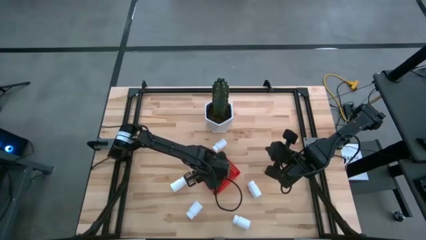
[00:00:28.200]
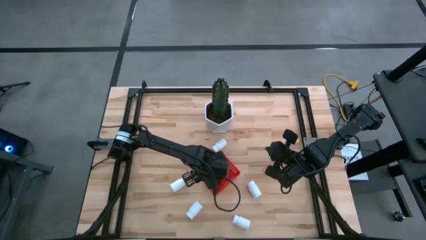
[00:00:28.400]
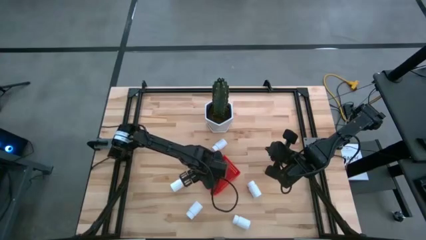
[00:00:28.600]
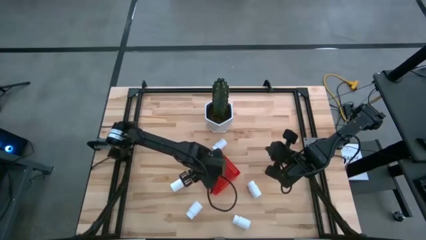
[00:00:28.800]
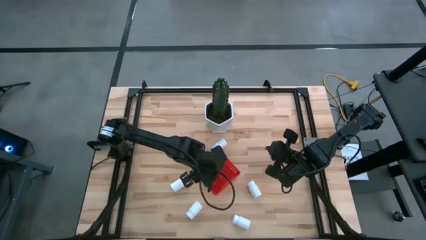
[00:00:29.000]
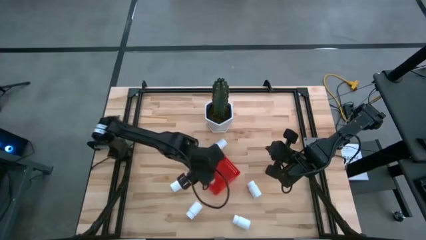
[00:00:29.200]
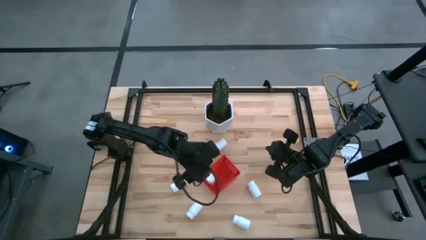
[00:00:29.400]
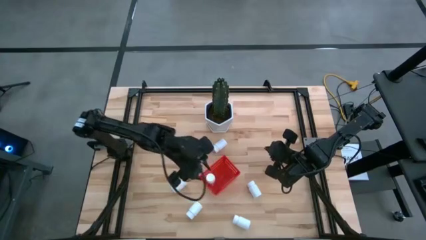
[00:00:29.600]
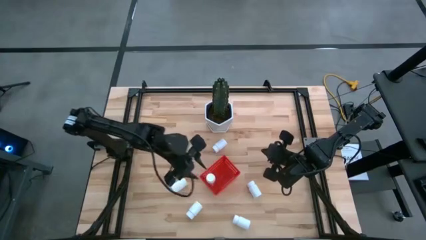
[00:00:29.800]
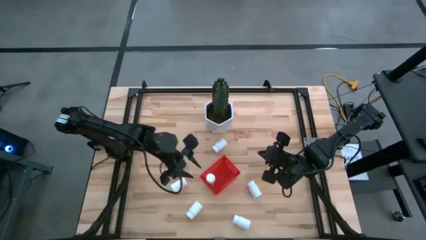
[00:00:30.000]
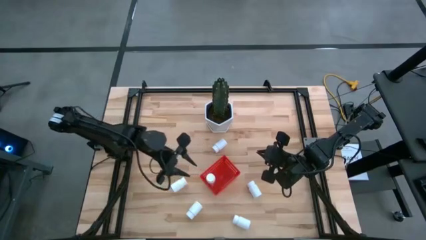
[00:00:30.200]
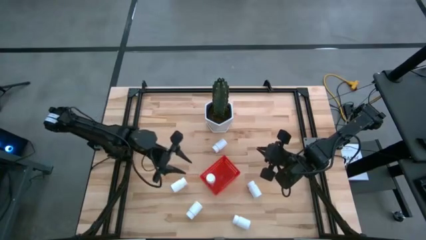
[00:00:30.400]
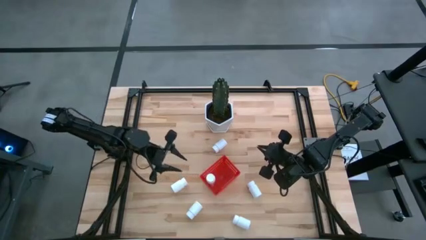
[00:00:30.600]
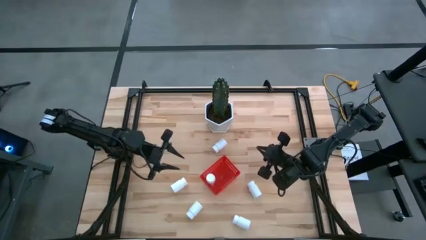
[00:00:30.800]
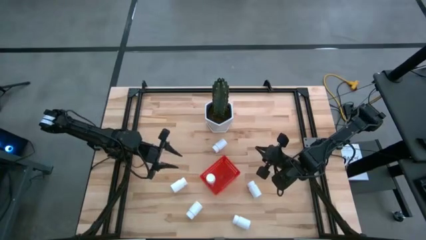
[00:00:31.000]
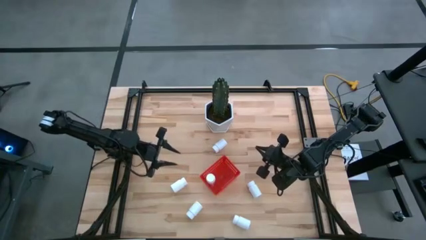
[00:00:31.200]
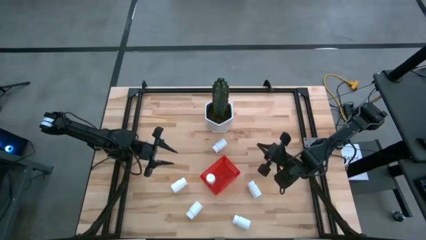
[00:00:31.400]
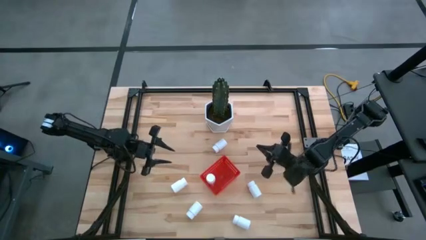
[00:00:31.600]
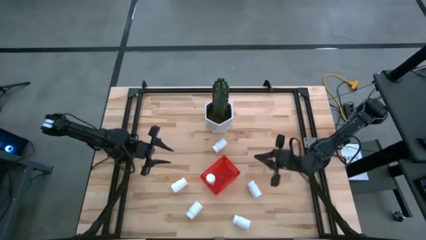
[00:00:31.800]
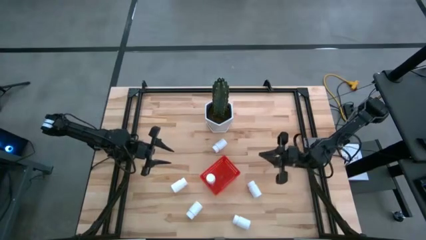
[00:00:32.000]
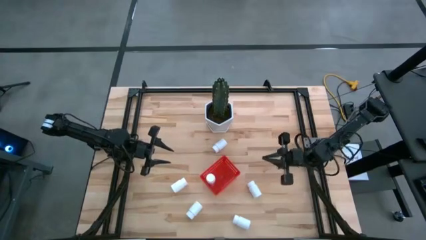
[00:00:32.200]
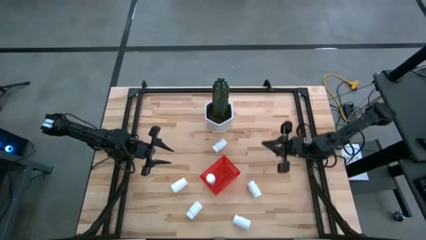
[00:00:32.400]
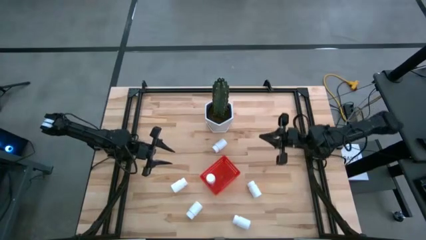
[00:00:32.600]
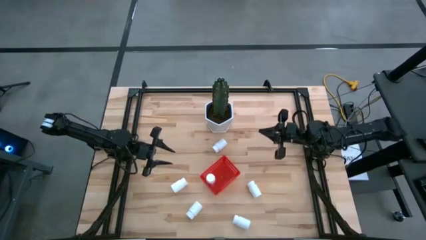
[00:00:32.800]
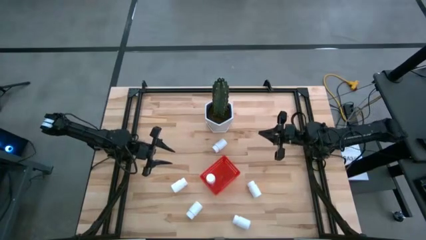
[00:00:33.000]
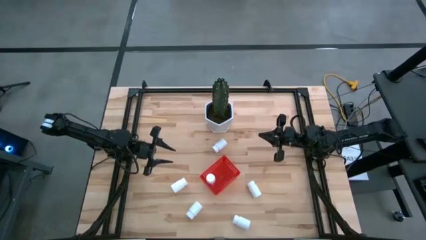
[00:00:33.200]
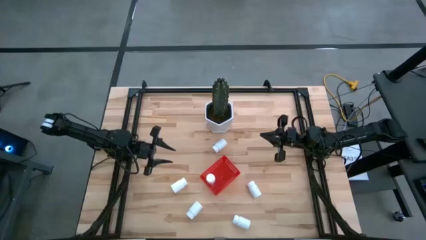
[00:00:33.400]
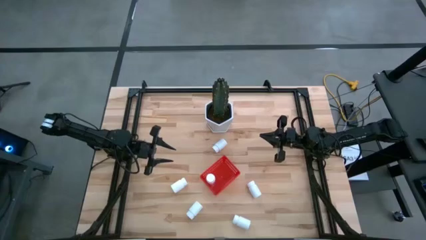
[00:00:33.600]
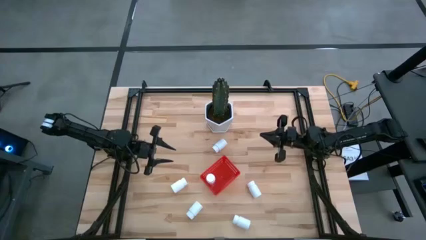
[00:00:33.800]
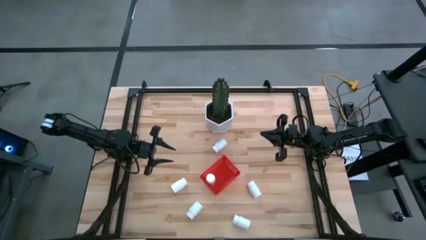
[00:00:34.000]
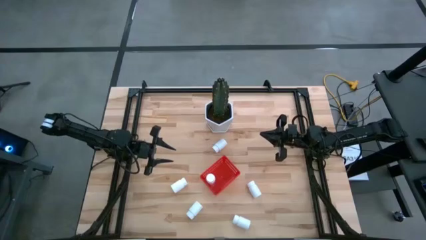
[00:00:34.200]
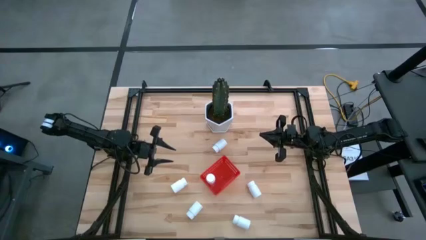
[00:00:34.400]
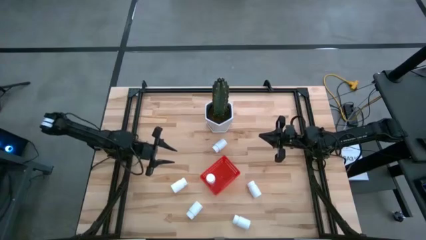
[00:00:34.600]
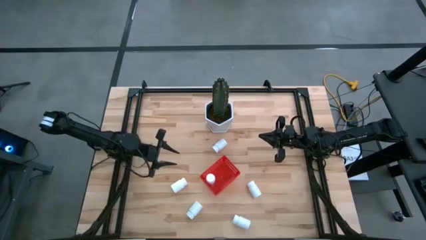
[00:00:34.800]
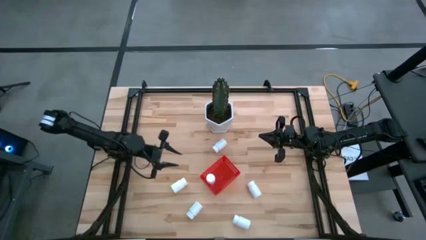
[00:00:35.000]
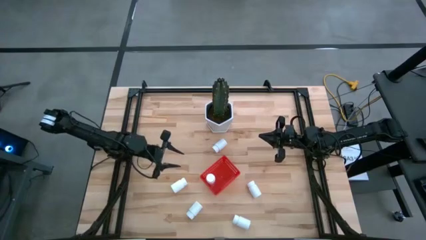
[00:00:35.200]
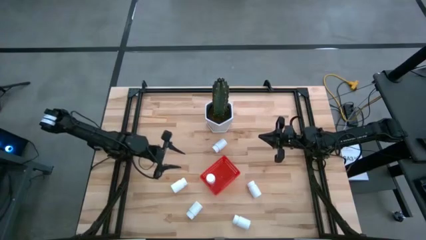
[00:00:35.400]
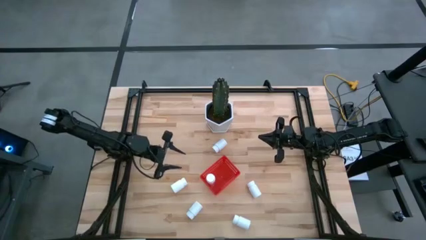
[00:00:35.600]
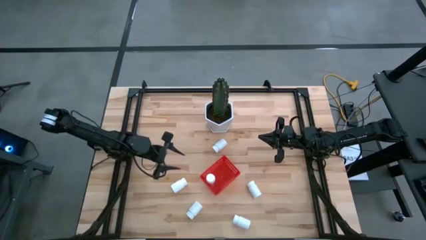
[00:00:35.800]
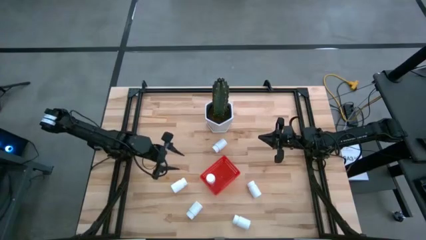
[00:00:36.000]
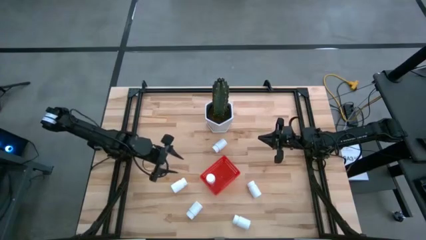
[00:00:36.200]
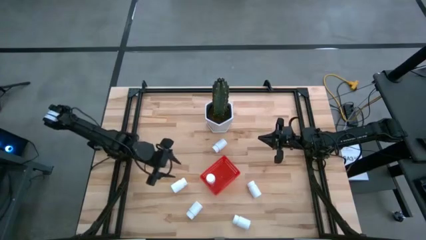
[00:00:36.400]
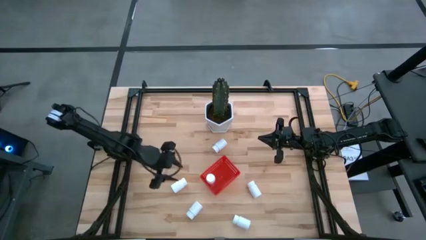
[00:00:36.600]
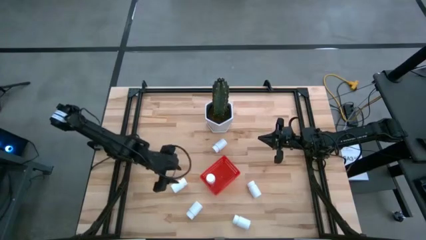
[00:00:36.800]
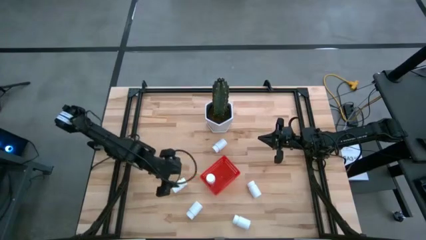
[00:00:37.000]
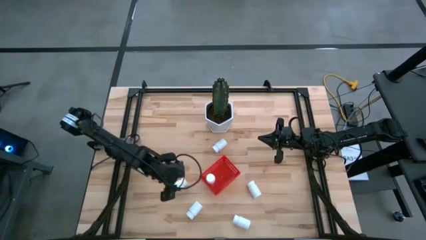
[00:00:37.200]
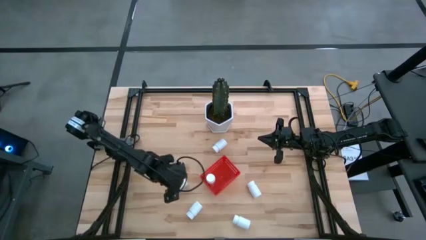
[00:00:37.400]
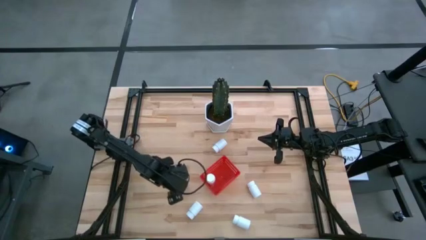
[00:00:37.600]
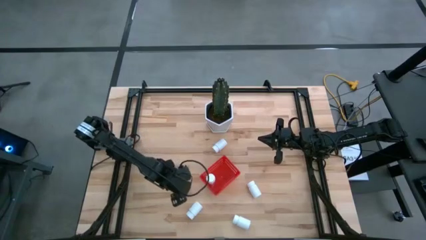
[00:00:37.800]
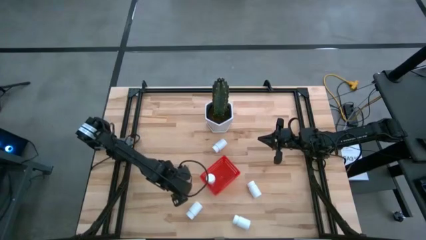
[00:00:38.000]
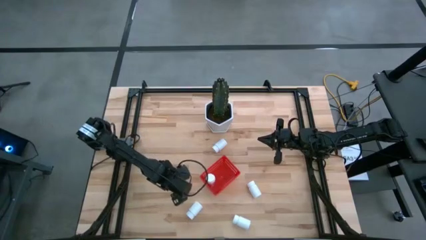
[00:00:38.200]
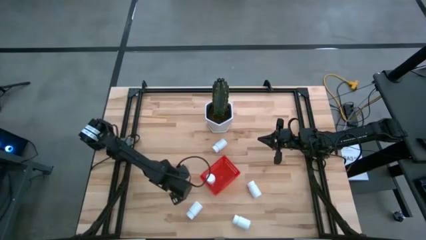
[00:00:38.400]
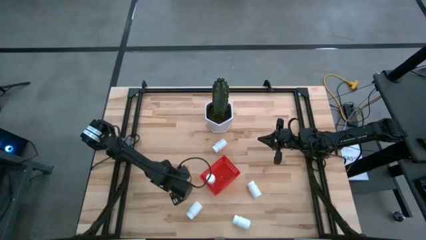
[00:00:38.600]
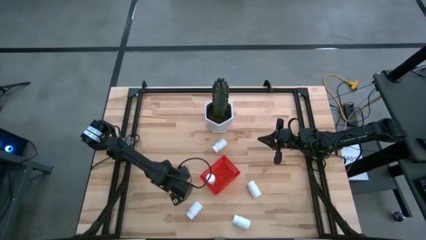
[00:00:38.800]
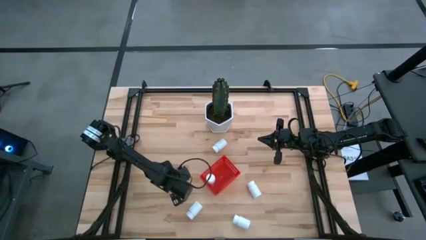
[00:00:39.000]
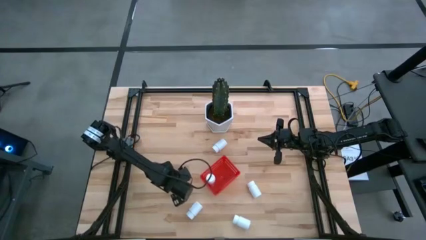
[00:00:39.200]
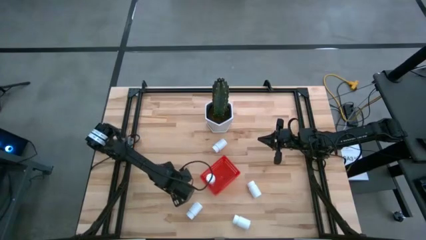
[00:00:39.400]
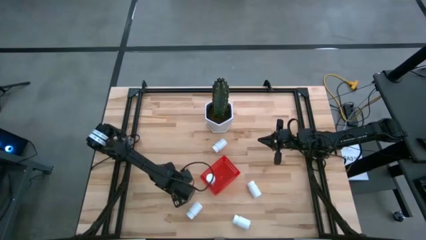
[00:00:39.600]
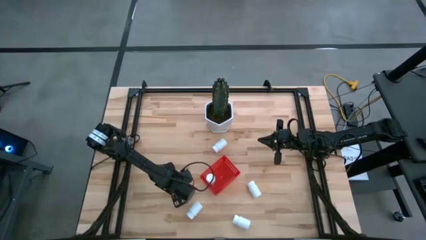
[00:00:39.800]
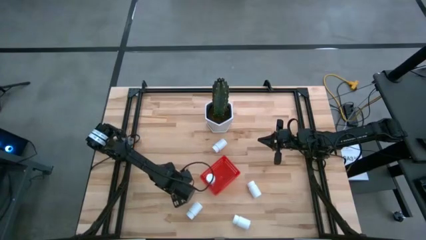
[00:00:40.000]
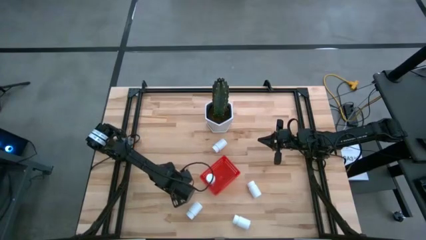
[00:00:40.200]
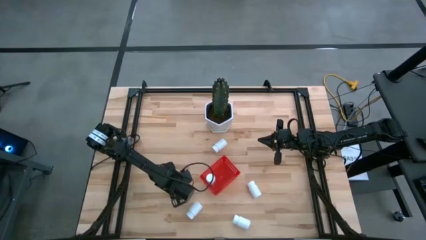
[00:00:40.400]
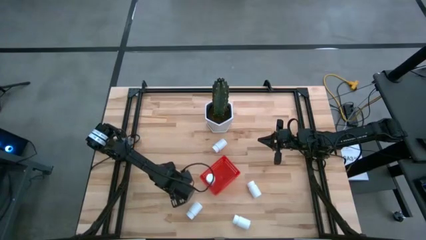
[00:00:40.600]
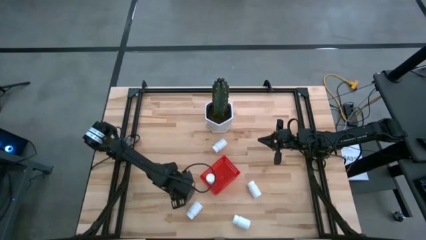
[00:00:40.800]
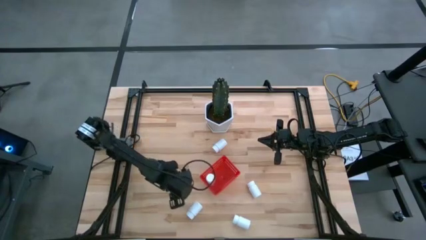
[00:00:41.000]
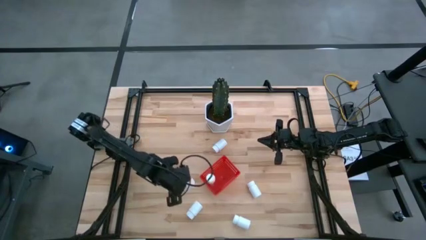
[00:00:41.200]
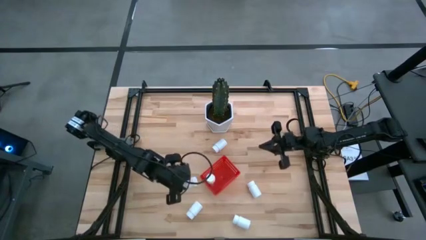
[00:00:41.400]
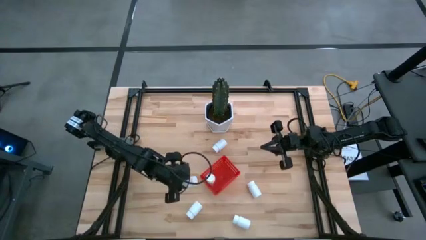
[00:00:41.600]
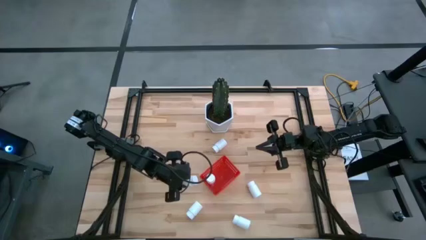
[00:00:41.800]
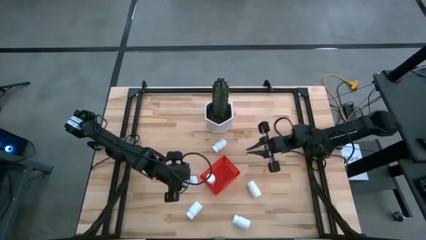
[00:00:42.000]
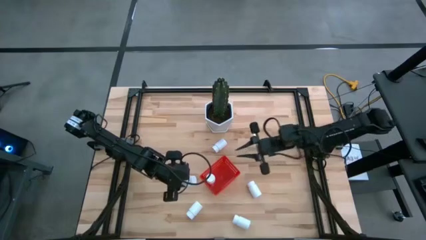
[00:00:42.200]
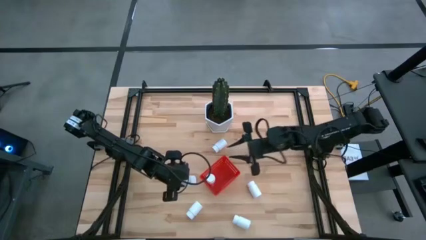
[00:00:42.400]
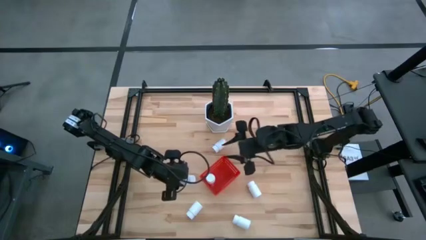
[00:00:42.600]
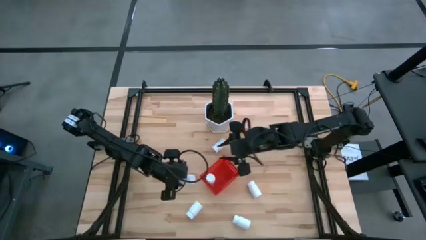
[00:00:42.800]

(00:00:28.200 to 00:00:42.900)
Task: Pick and place pill bottles into a basket
Put the white pill bottle into the red bin
